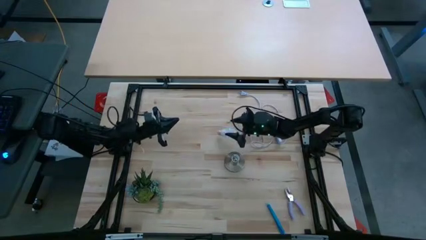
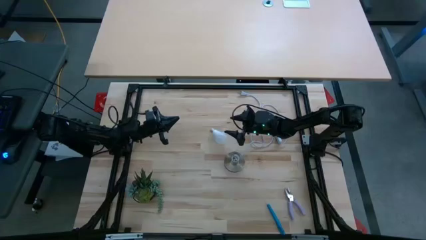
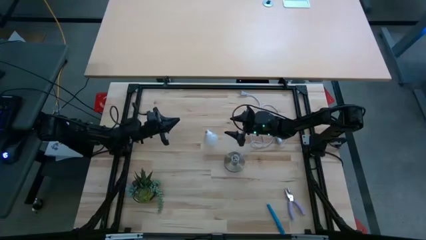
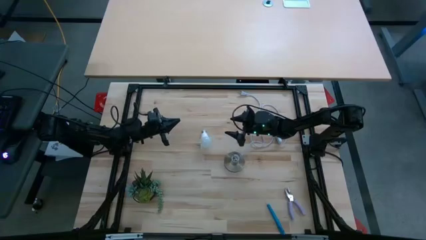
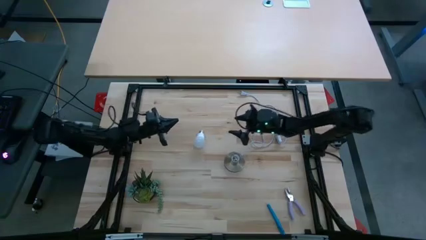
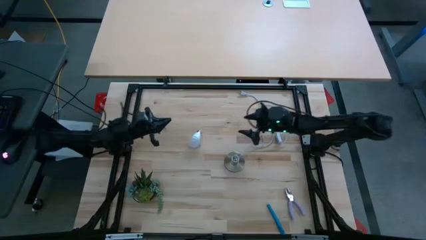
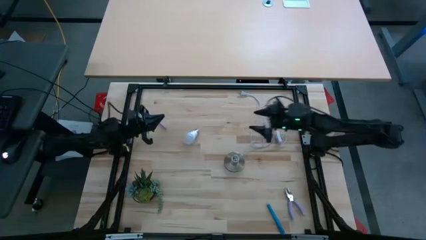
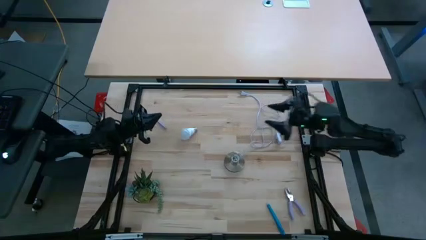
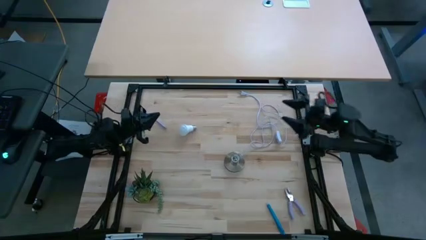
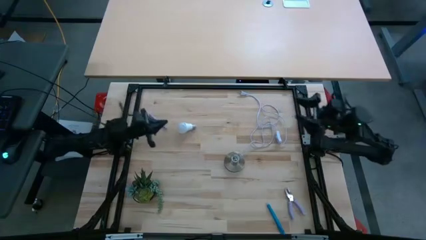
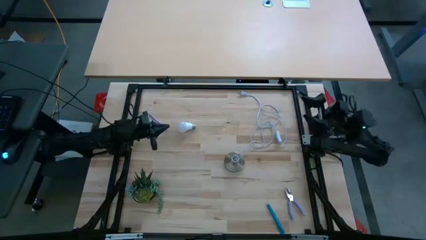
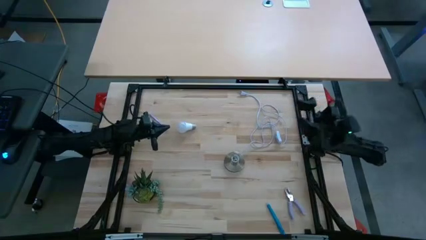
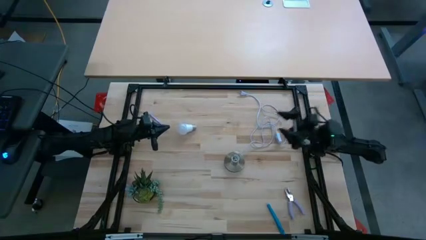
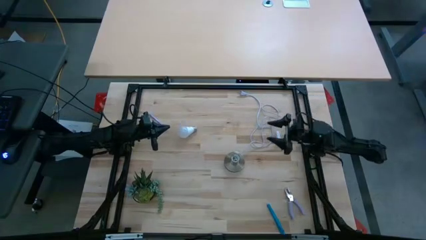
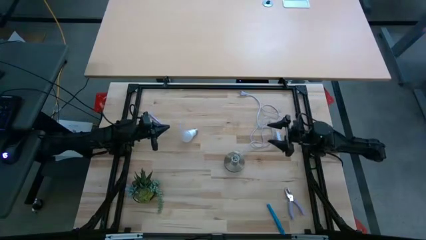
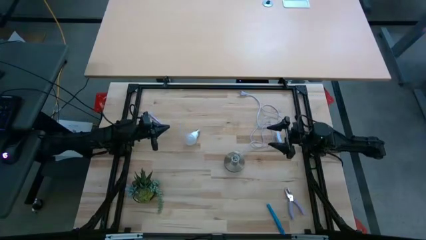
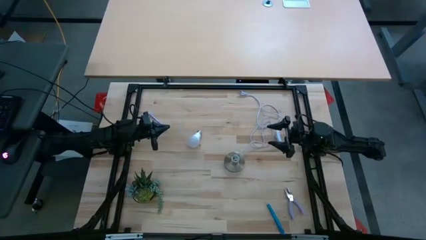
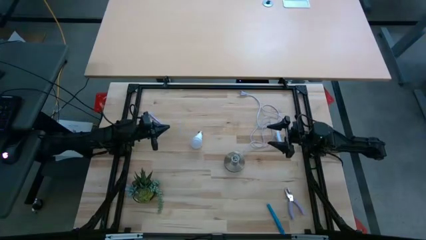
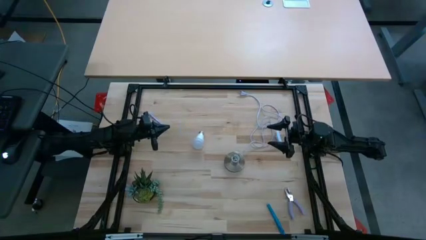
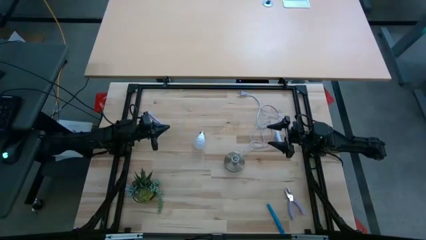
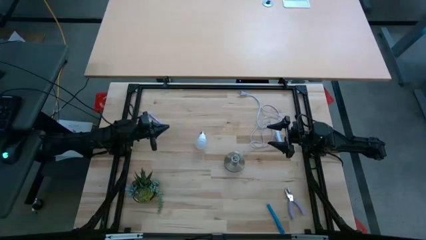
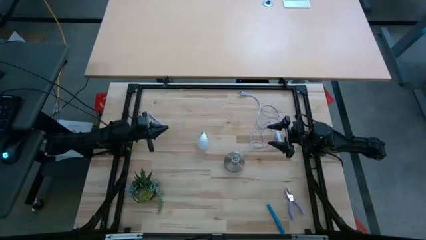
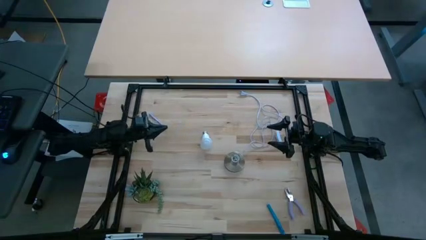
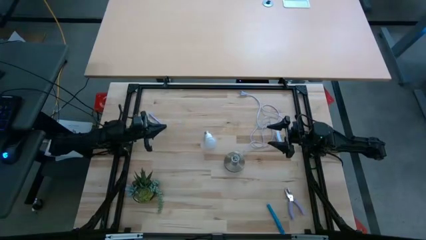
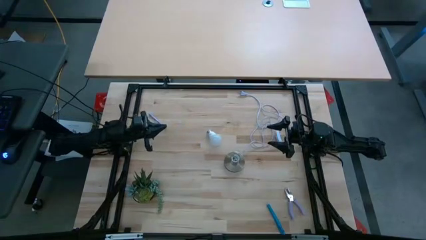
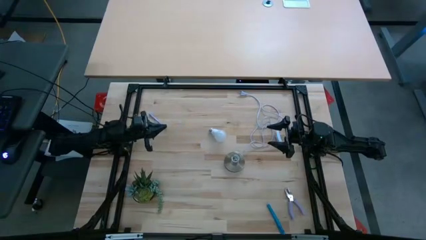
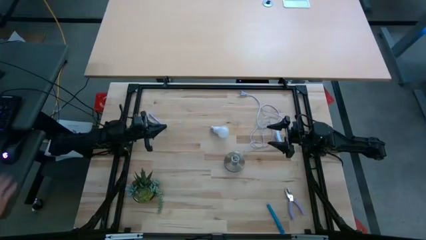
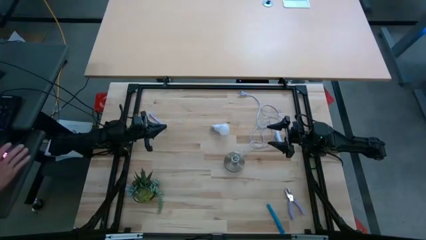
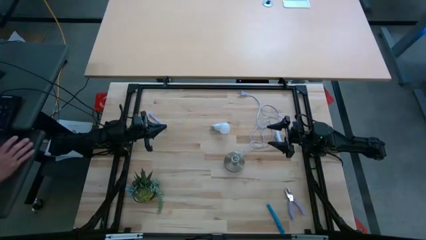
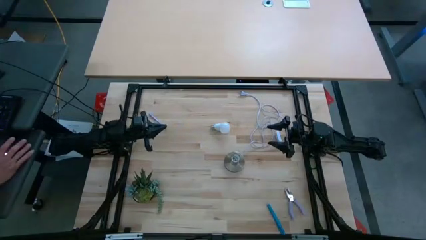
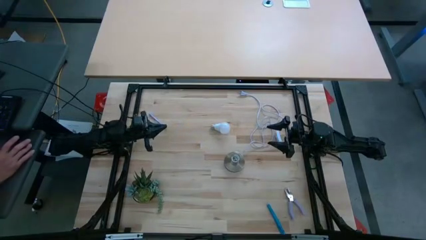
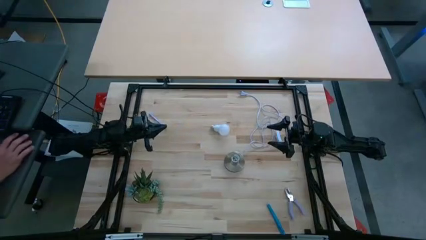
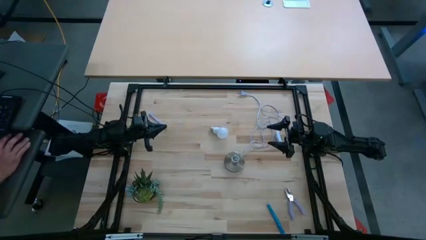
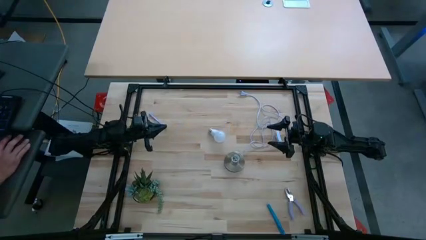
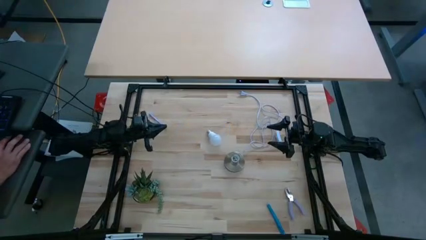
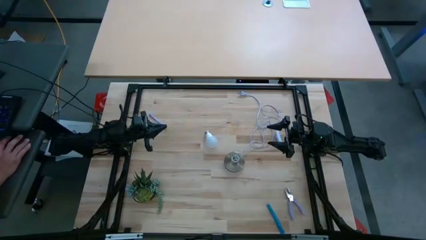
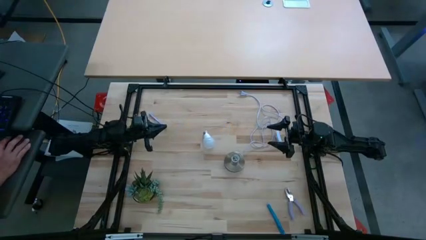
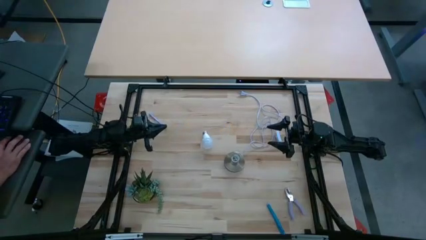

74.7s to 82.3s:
Task: Screw lightbulb
Return to Home Position

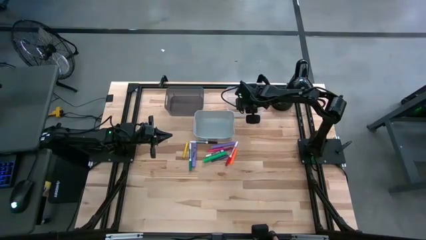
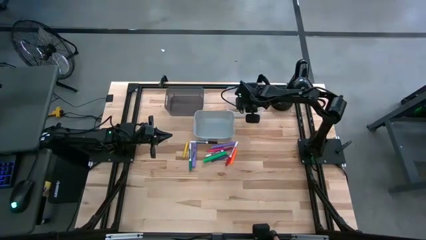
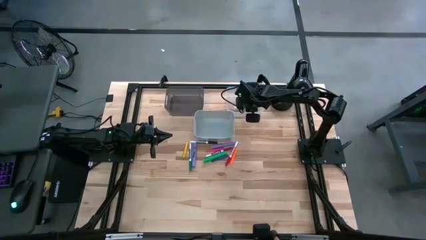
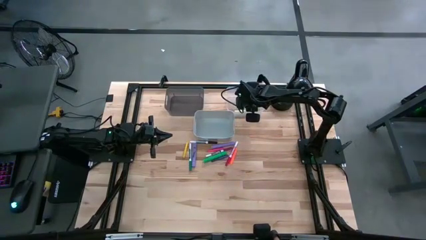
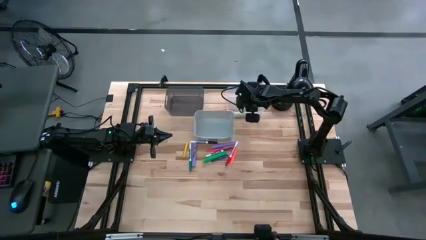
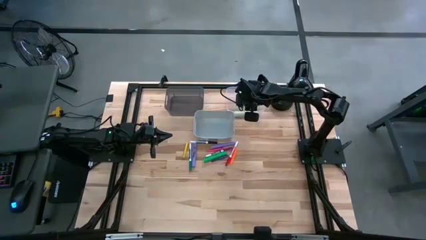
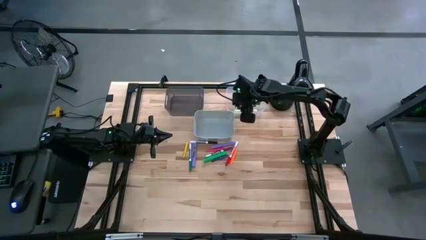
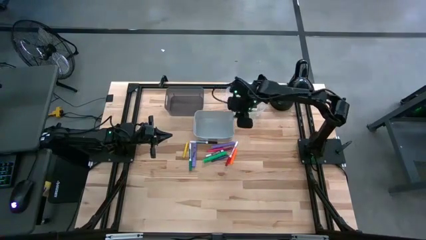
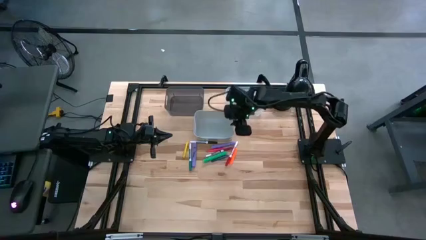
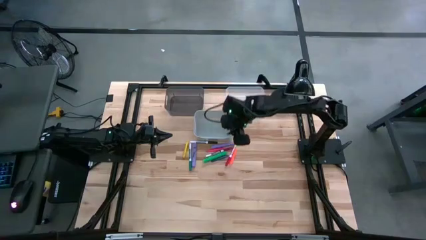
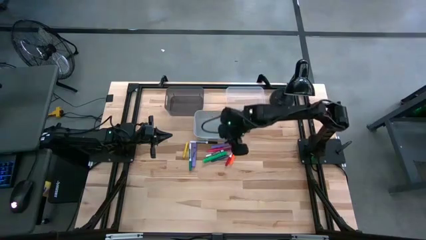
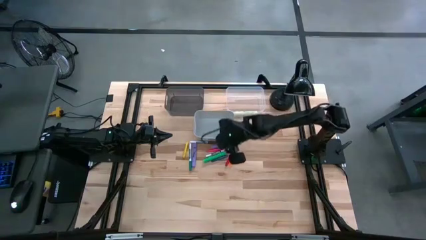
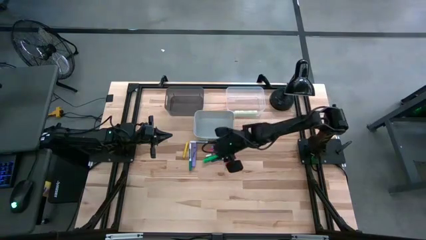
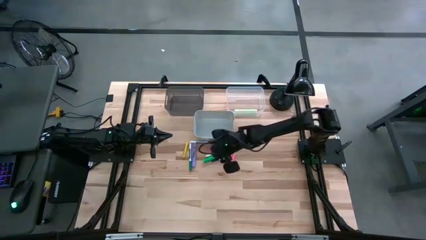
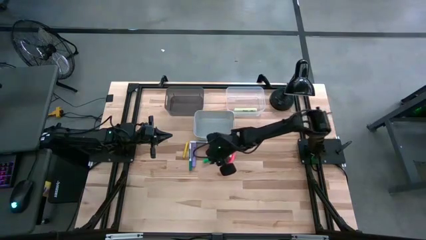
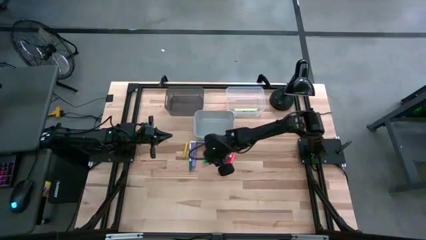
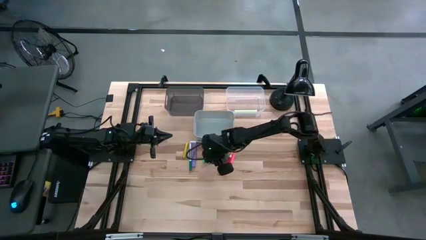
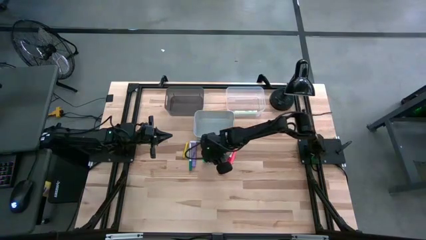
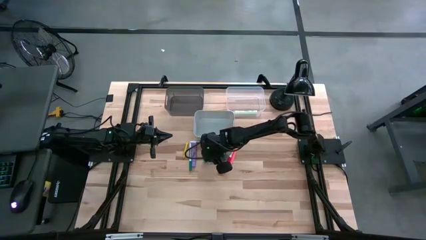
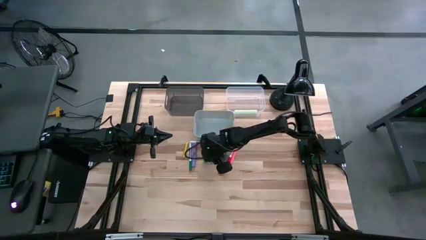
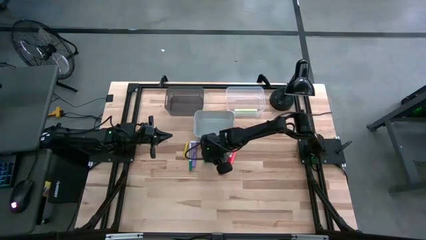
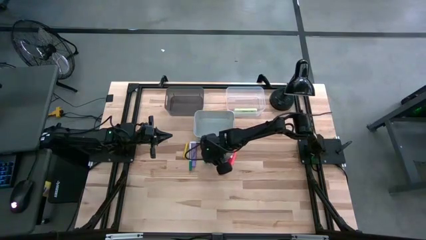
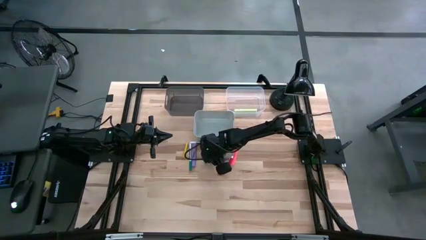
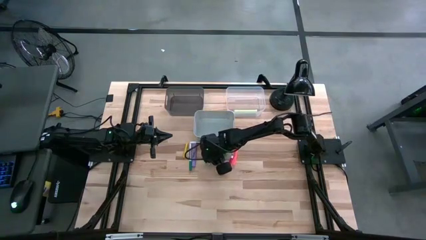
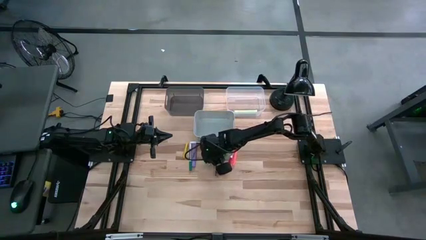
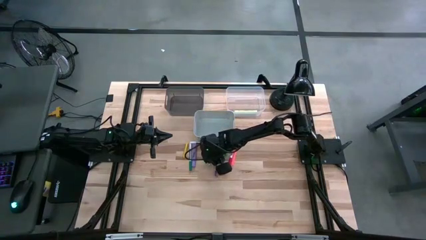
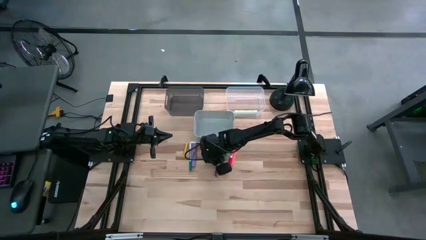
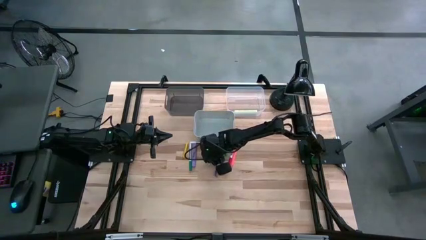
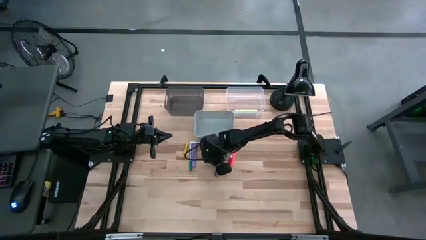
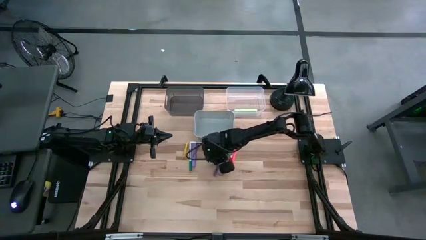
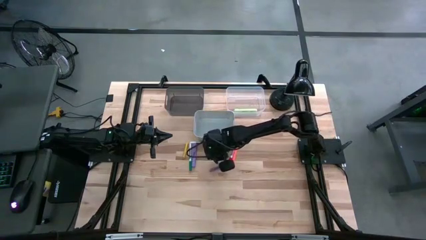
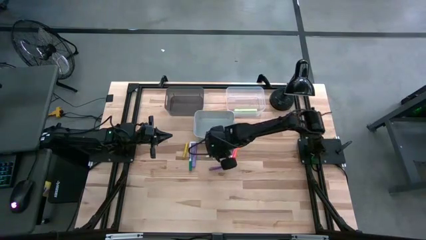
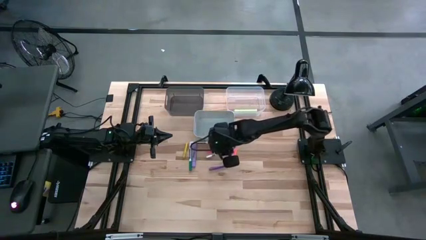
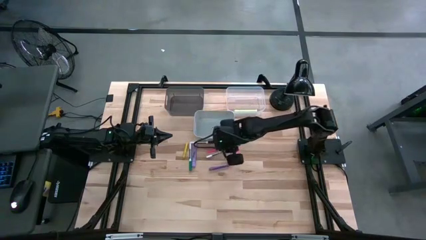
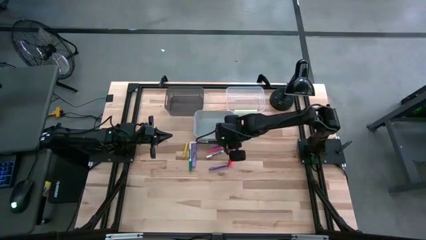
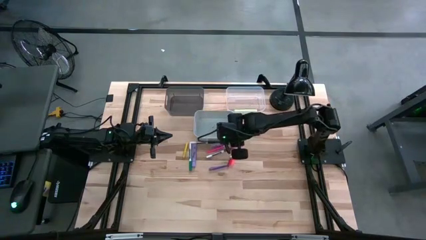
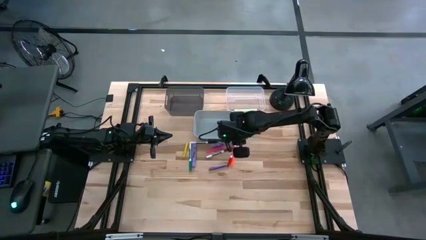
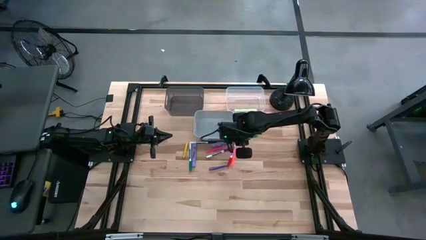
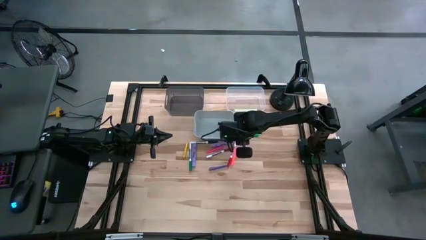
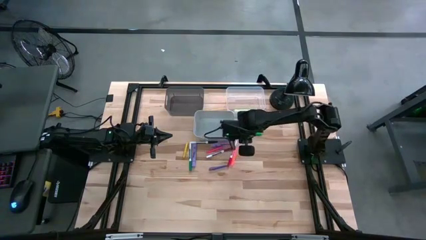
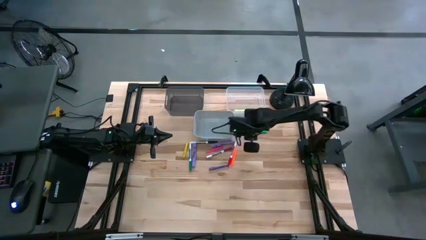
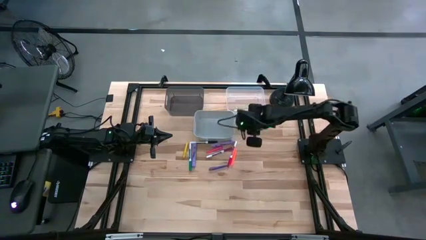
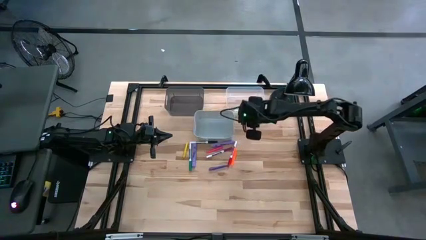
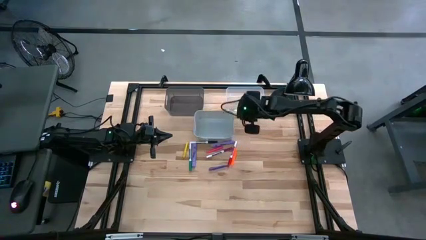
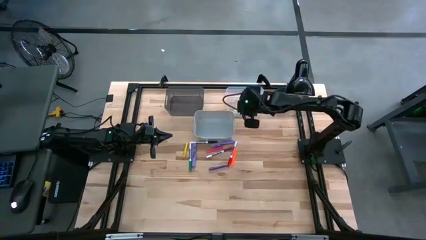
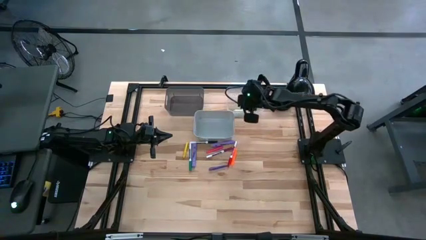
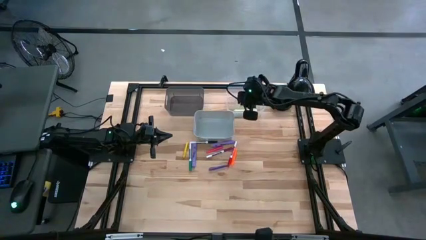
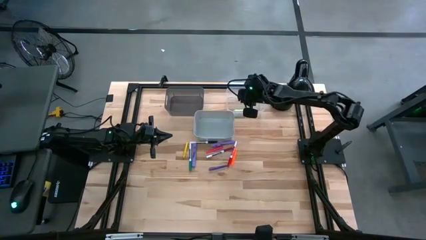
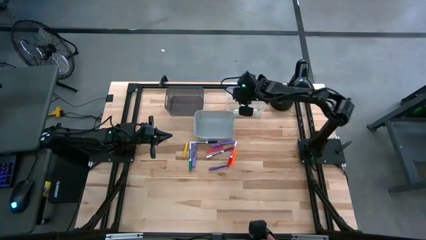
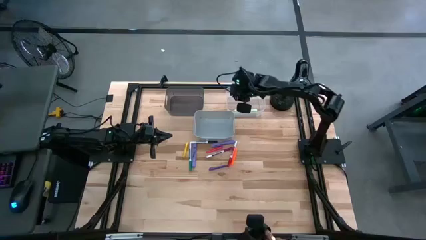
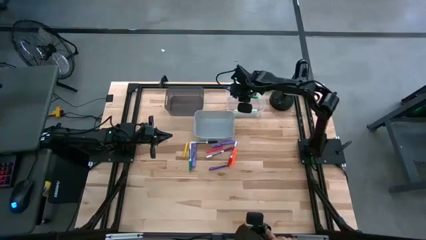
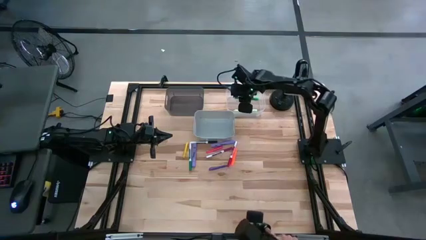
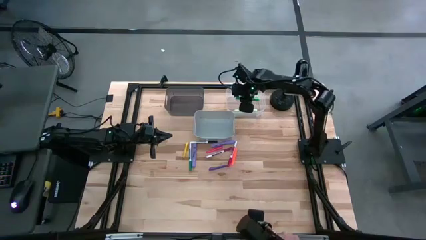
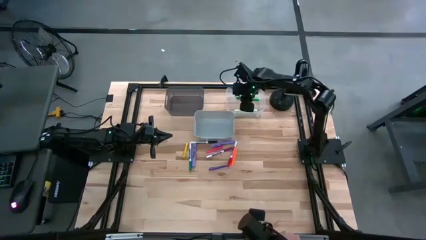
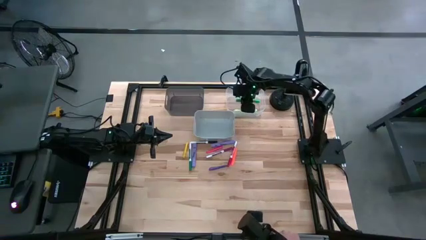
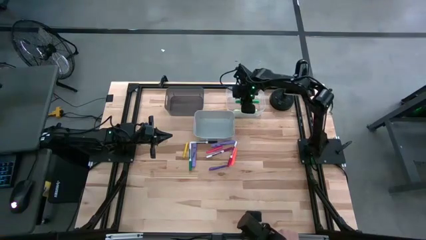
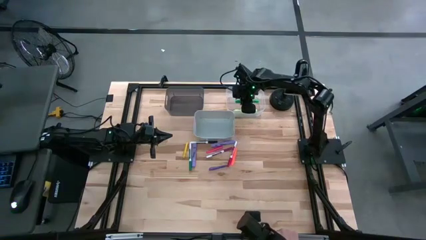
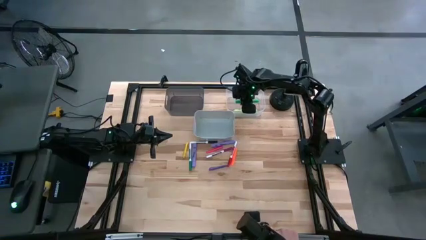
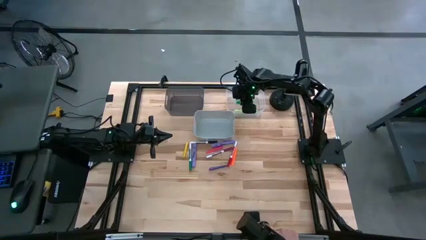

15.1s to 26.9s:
Task: Pick & Place Markers
Put the green highlighter into the transparent bin
